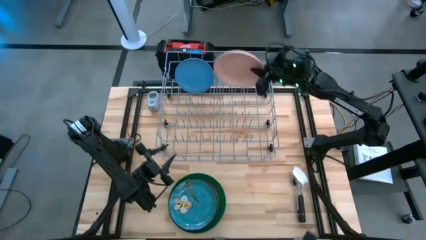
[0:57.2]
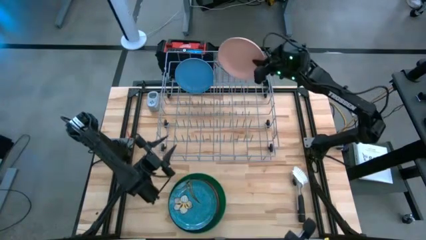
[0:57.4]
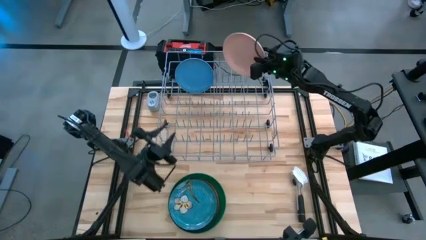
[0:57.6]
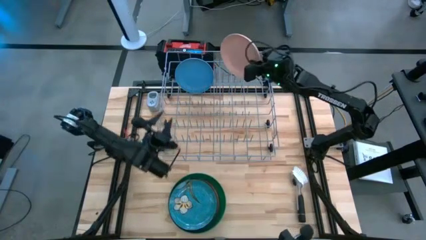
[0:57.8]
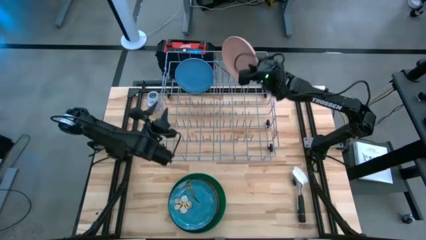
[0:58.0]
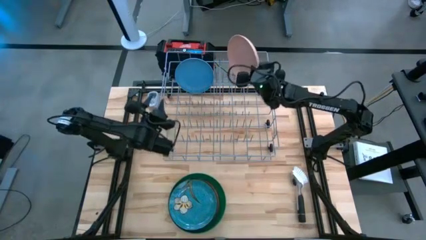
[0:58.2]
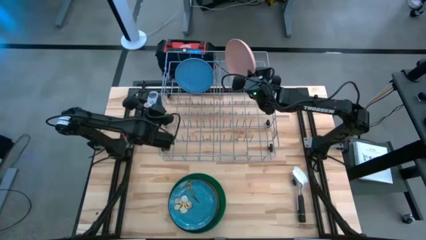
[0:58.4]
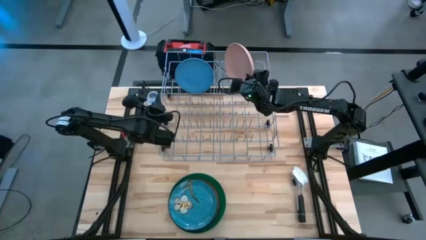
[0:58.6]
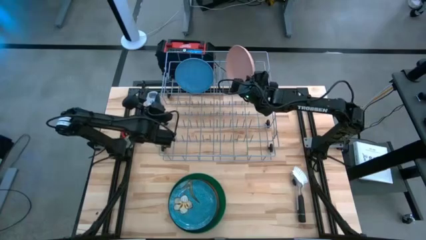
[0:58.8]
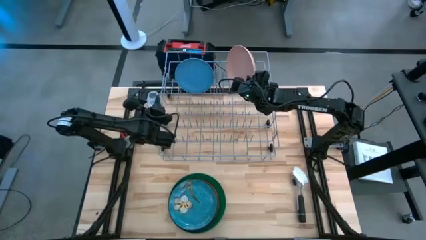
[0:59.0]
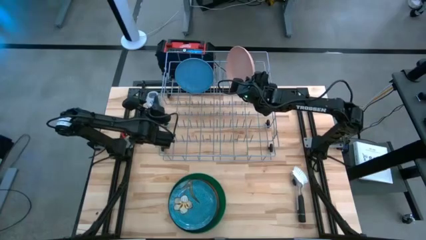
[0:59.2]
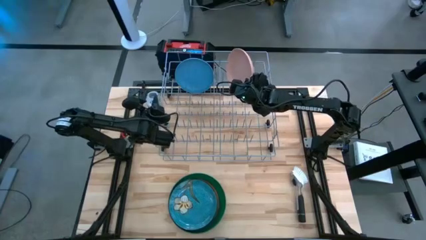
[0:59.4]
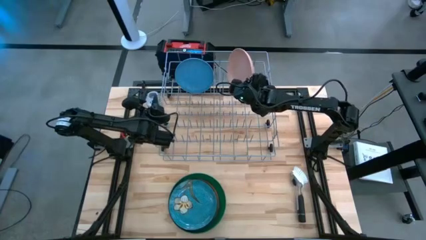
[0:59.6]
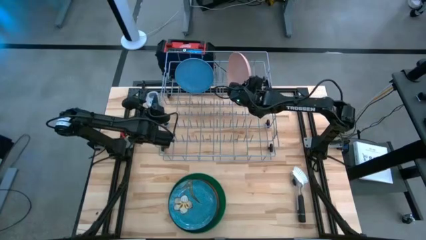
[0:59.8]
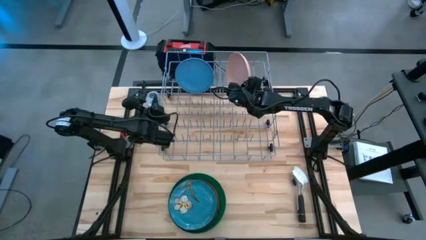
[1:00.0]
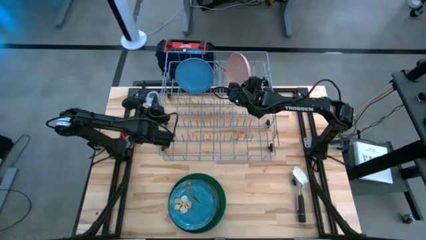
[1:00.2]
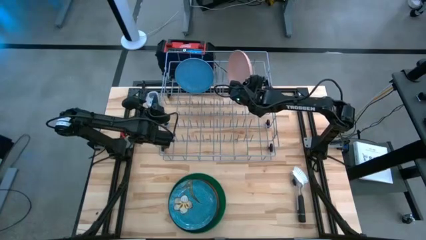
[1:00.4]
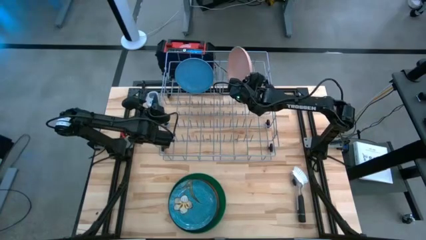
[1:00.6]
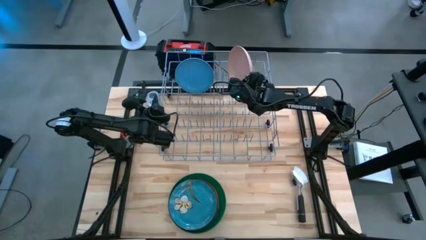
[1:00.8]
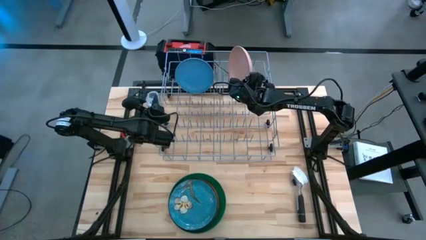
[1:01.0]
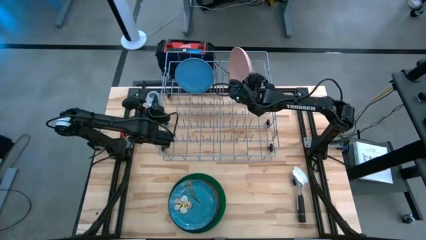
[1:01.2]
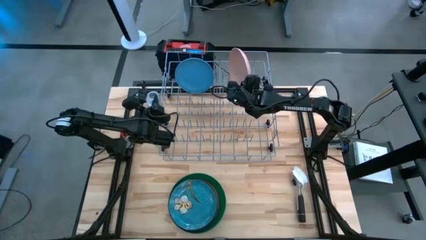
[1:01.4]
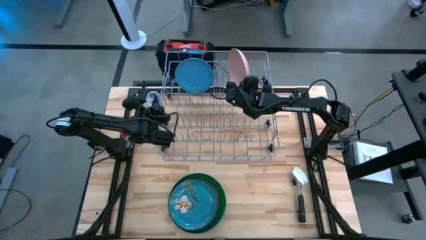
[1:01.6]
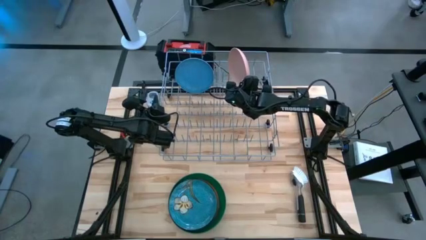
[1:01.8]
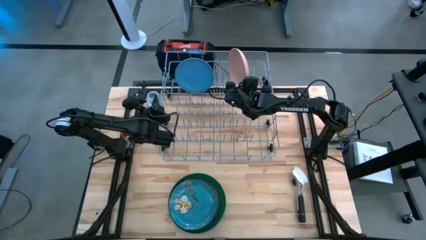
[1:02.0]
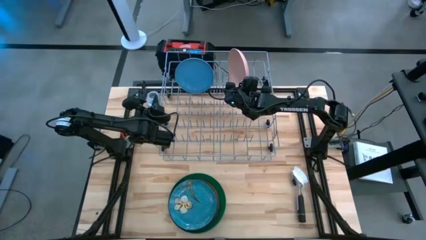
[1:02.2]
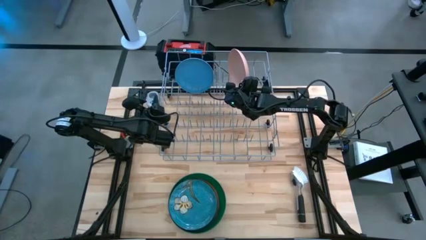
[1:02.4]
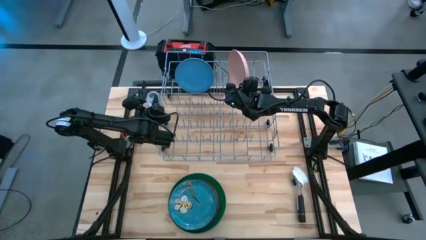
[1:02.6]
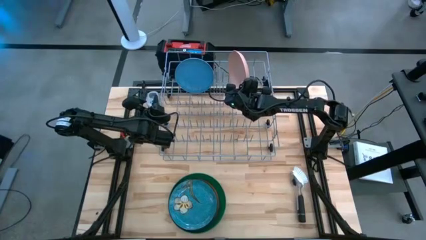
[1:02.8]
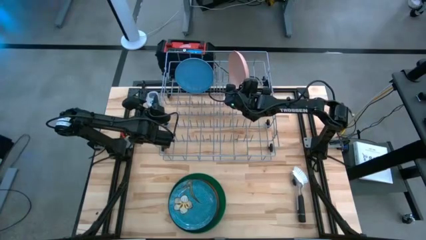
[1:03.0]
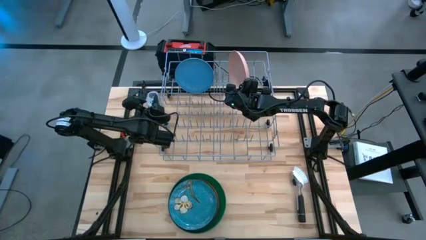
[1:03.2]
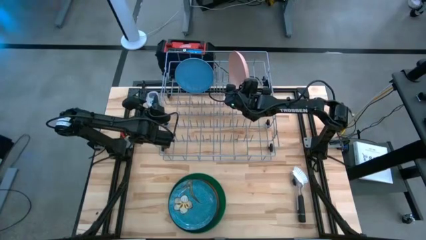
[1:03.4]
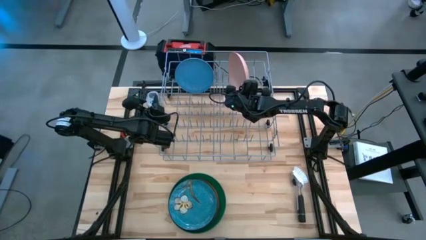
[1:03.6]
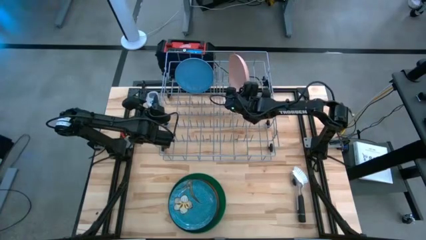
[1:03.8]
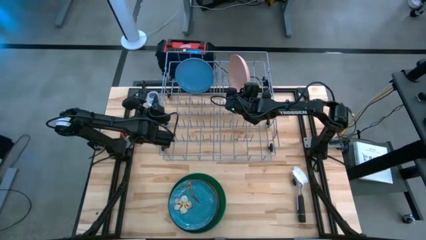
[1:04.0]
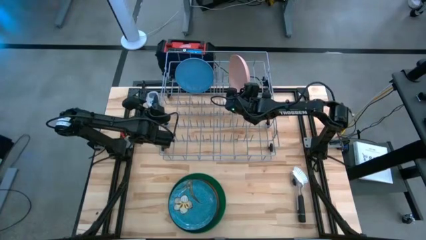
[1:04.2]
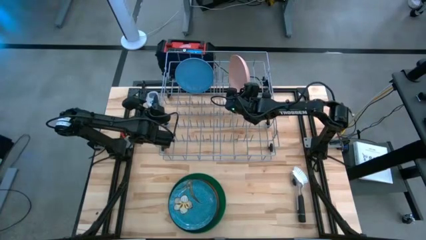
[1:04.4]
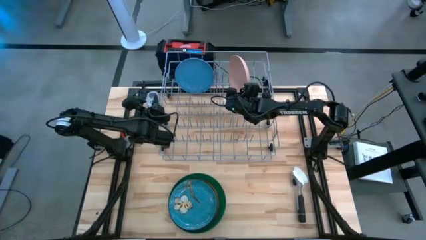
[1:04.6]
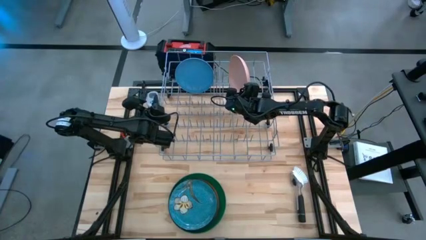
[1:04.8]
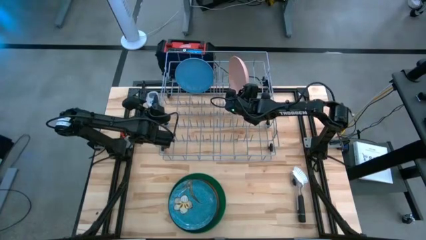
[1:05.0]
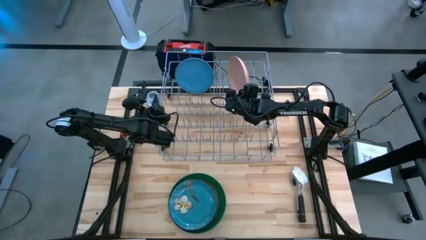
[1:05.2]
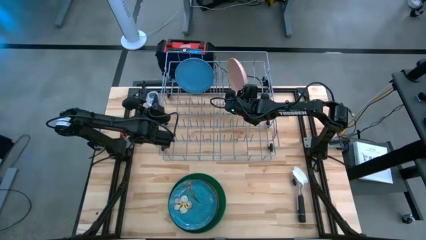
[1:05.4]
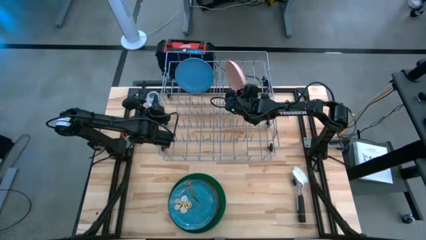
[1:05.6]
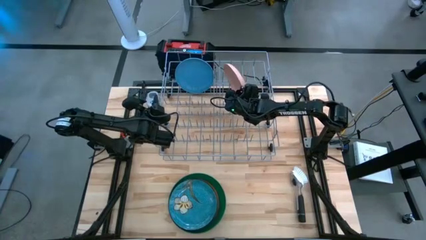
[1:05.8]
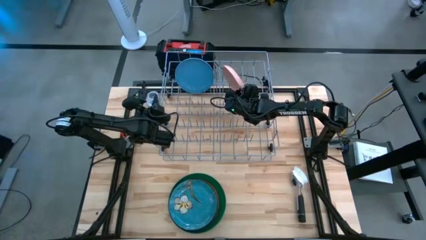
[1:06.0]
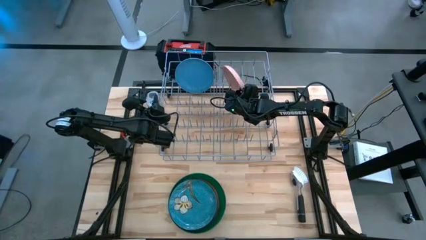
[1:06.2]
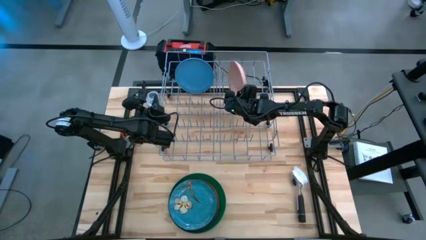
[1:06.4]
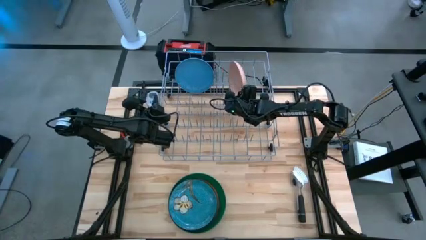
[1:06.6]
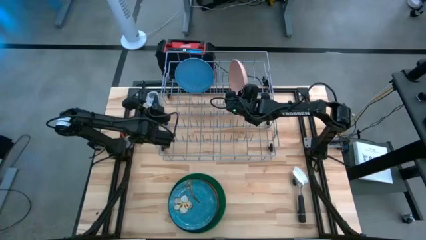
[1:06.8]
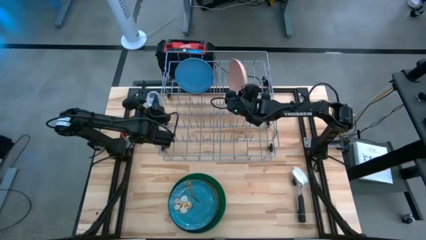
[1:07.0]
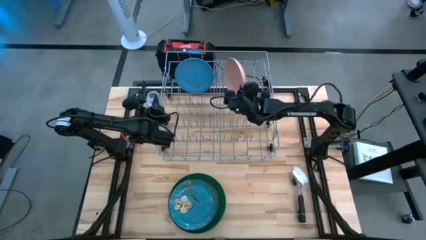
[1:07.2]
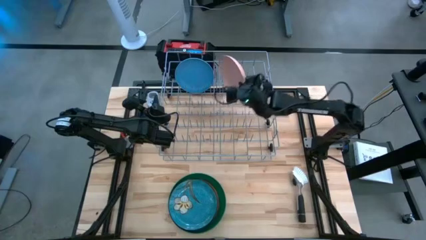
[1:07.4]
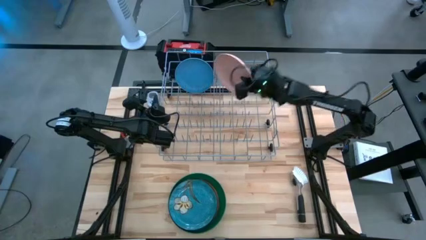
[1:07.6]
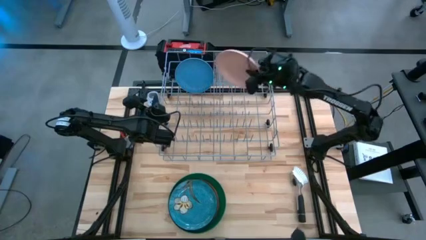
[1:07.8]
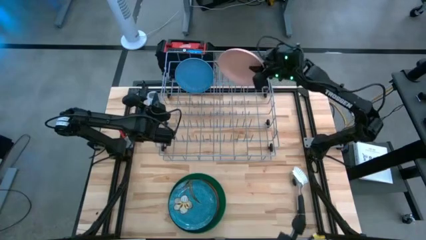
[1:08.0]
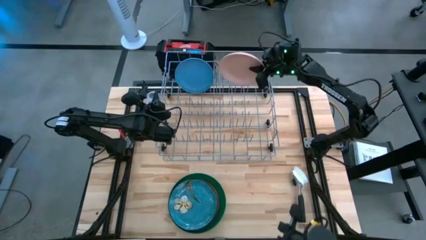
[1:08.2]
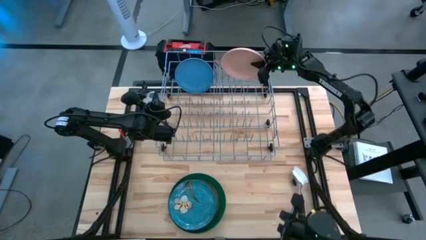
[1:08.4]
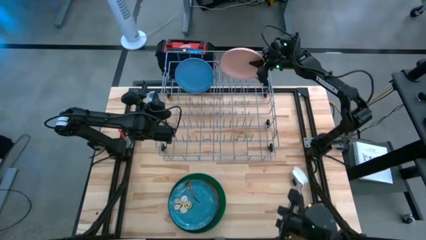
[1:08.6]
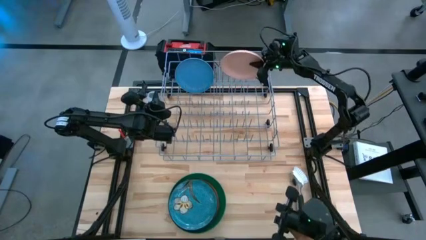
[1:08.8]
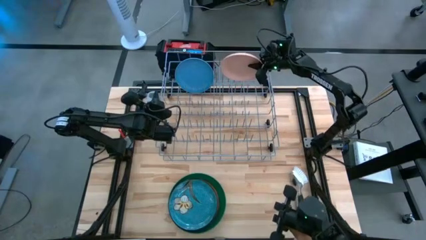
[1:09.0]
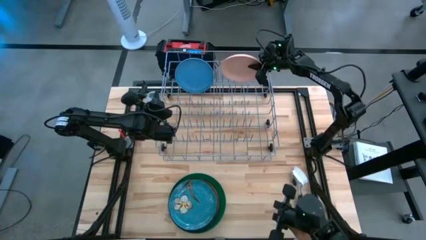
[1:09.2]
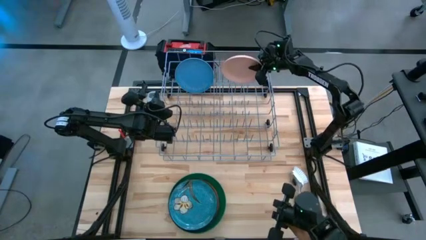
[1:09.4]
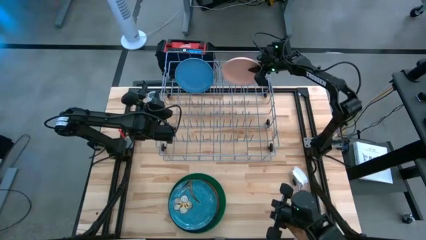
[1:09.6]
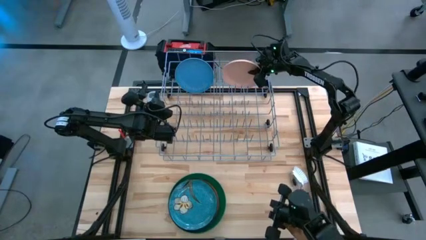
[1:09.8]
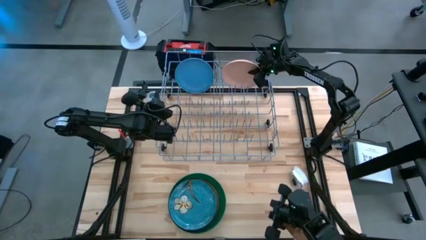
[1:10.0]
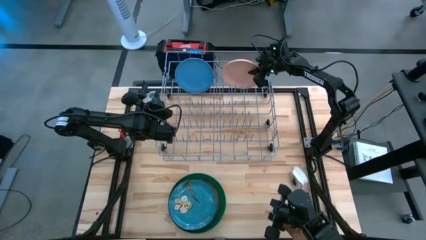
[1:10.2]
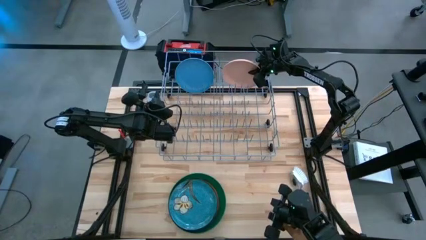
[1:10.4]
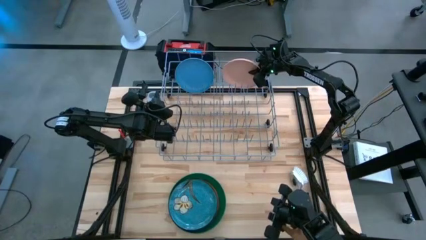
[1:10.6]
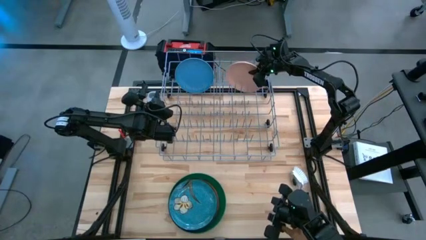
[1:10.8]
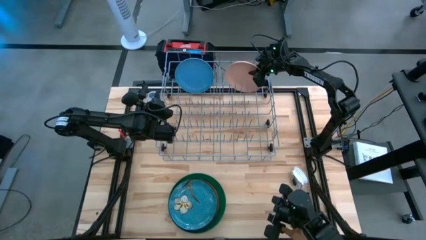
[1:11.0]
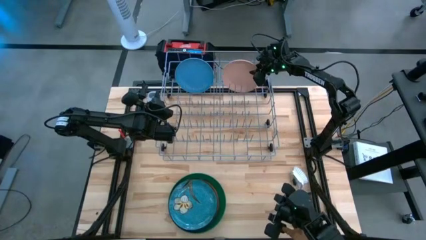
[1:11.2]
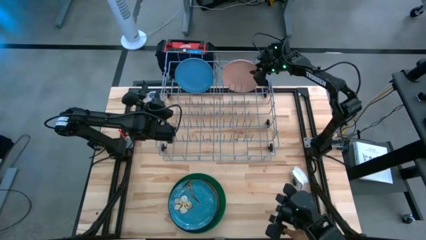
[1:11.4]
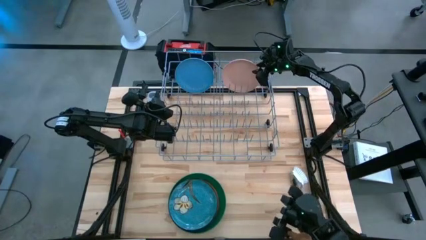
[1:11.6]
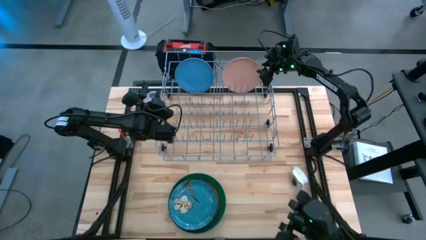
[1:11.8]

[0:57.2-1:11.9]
Task: Sort dishes
Put the light pink plate into the dish rack

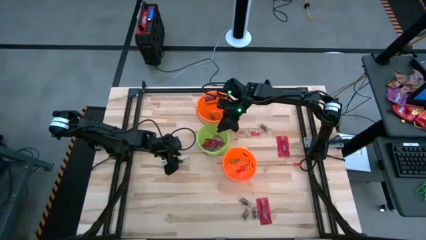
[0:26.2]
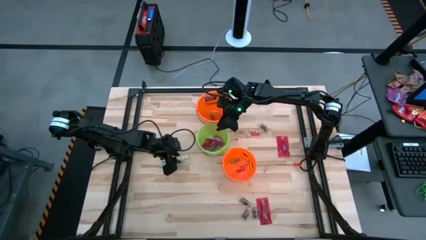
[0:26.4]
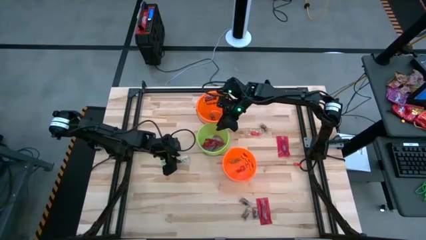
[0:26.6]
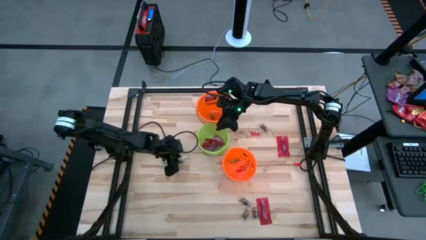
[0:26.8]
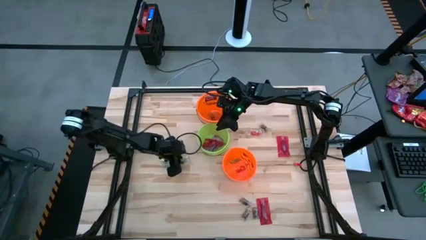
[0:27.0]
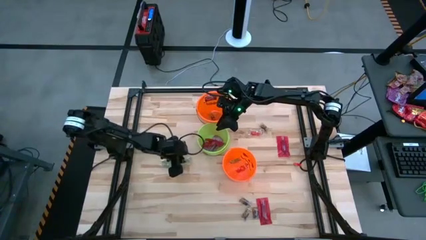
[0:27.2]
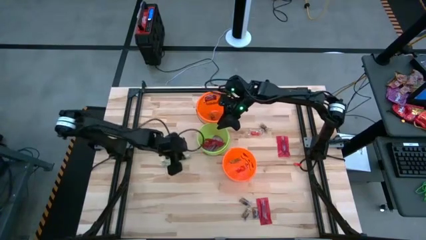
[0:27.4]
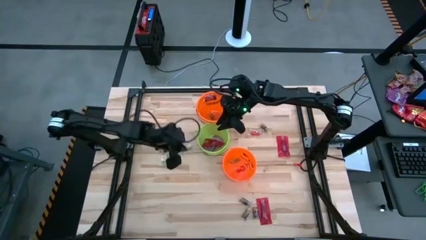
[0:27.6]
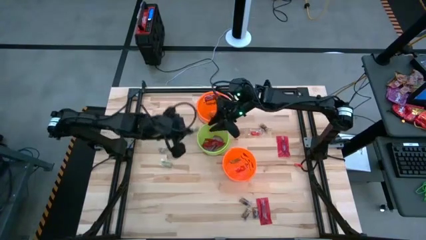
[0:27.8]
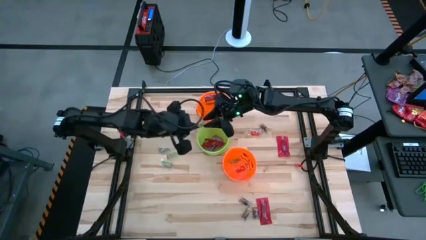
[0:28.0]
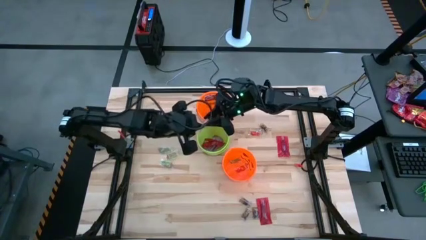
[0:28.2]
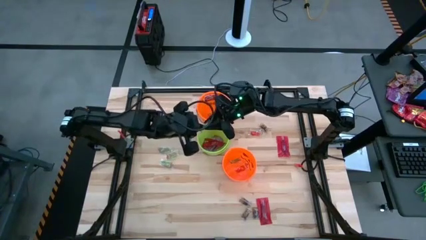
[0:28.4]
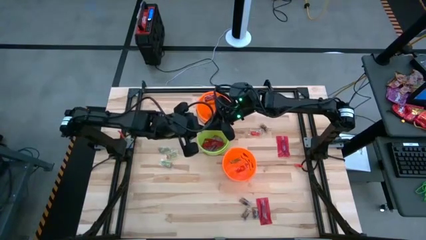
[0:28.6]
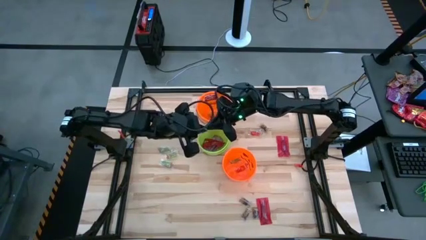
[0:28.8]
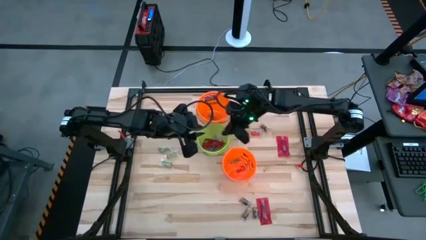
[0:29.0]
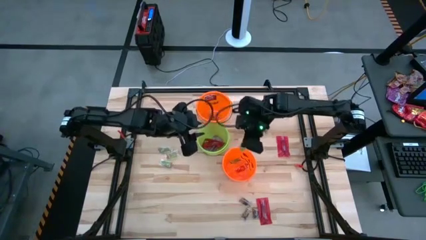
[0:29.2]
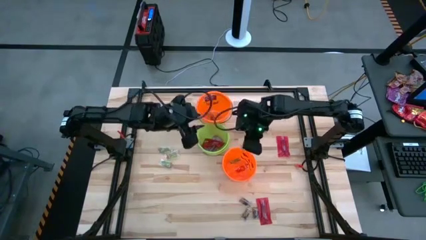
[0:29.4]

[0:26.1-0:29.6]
Task: Sort candy by brand, put in halloween buckets
Put the green gummy into the bottom orange bucket
